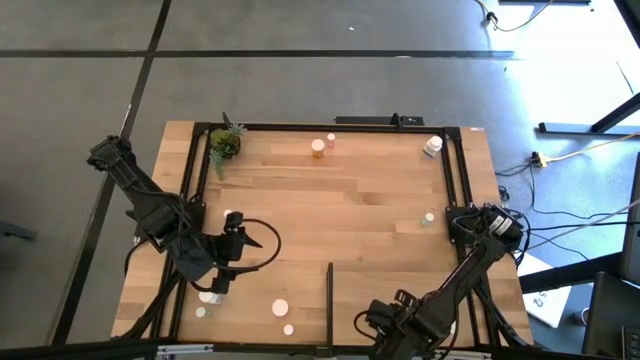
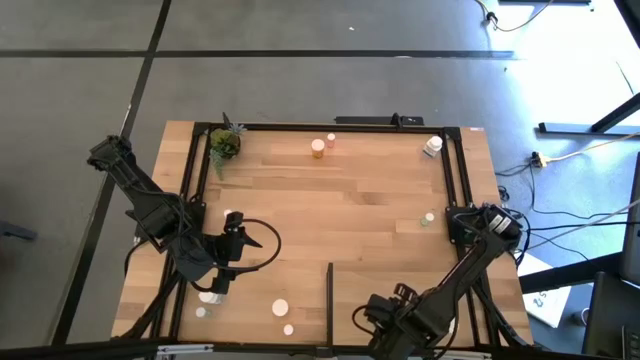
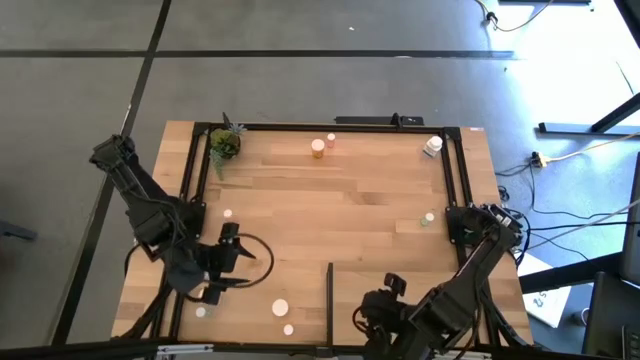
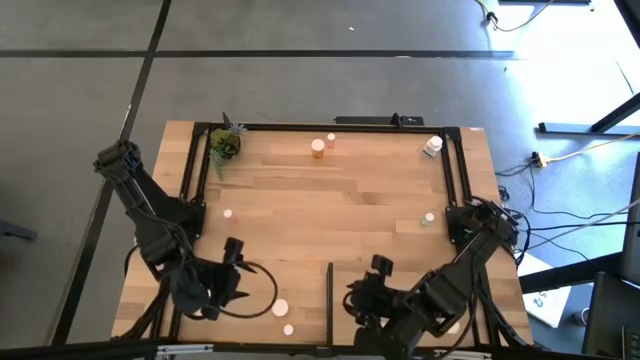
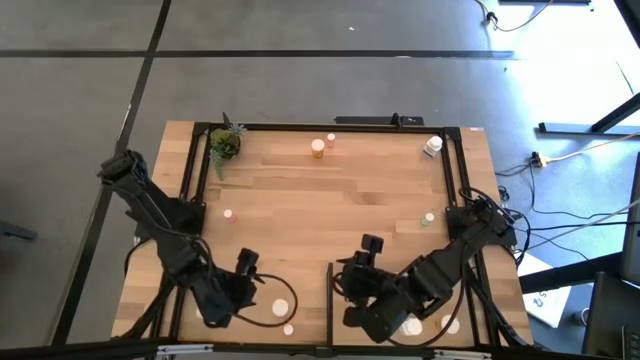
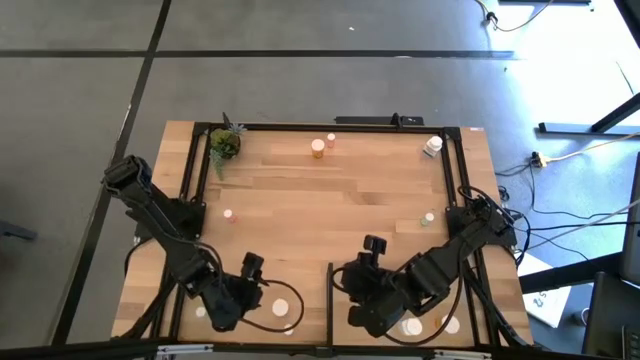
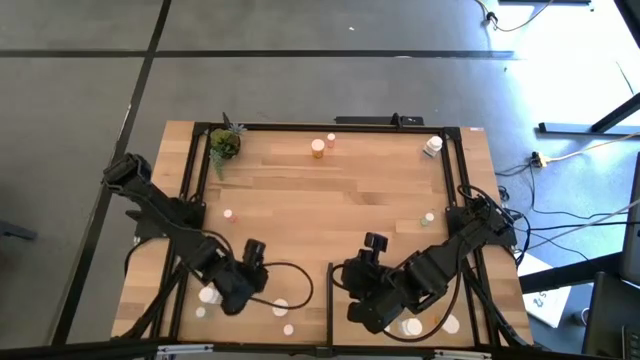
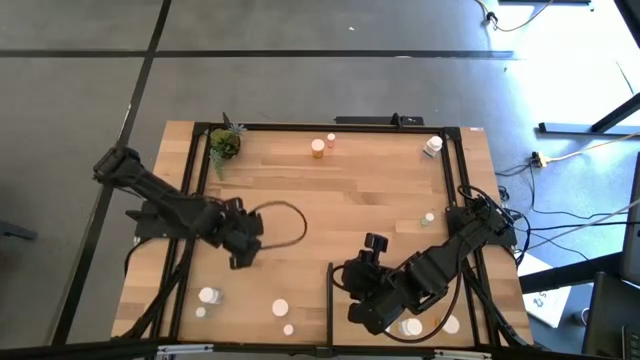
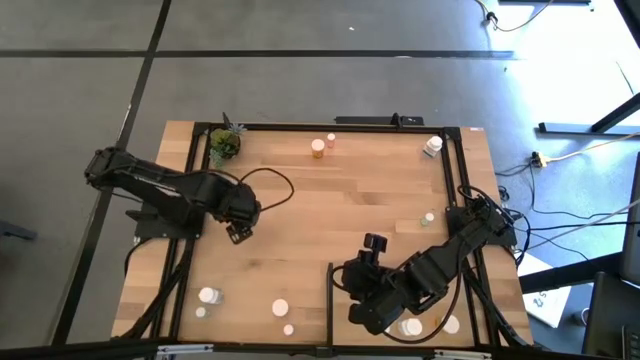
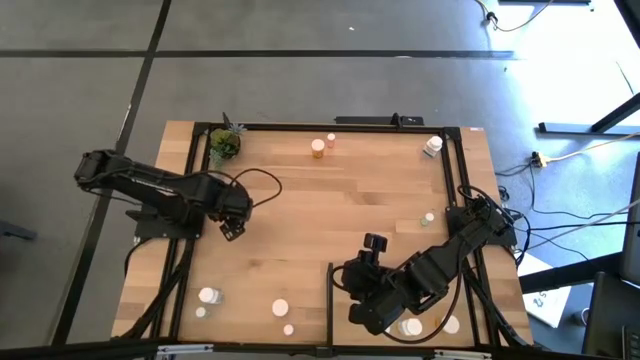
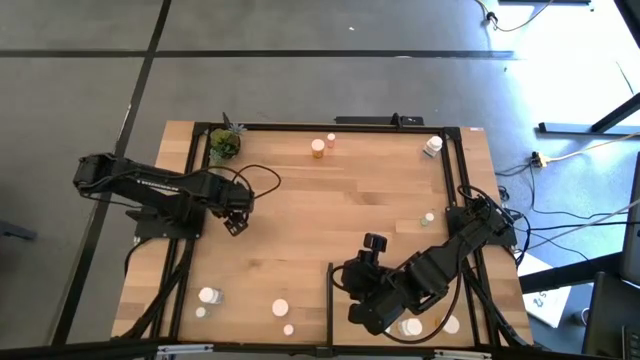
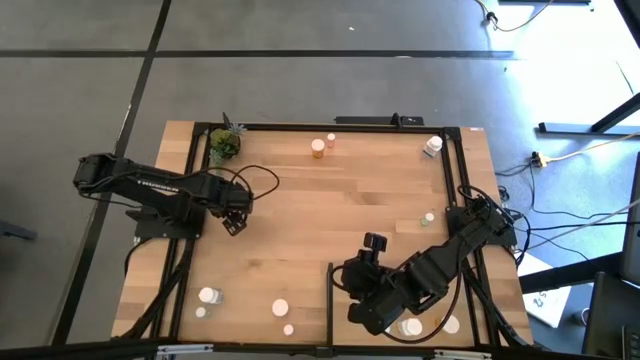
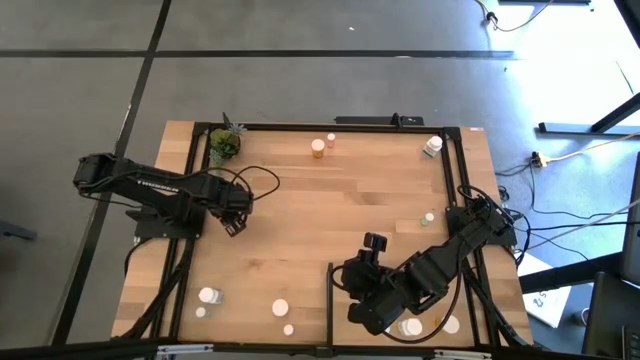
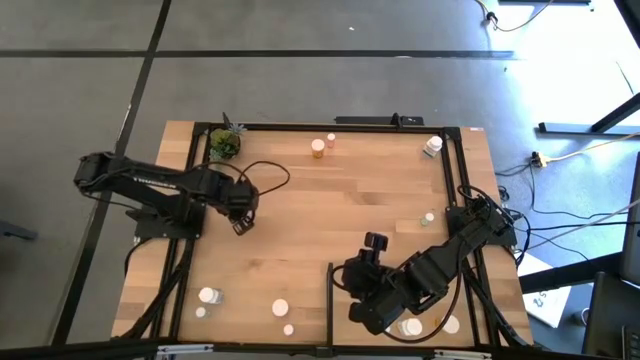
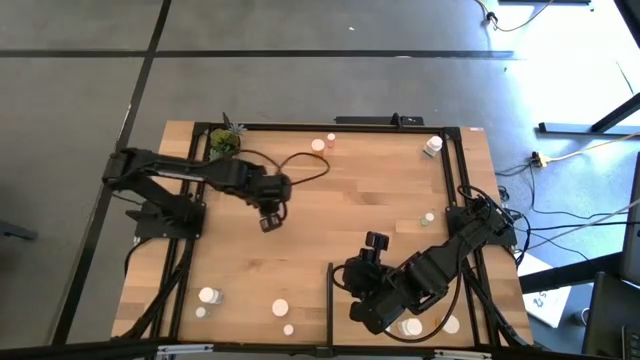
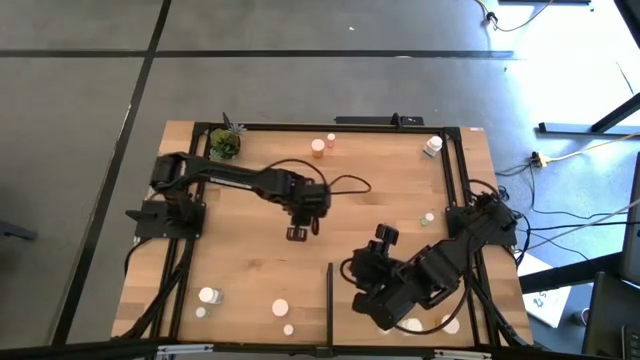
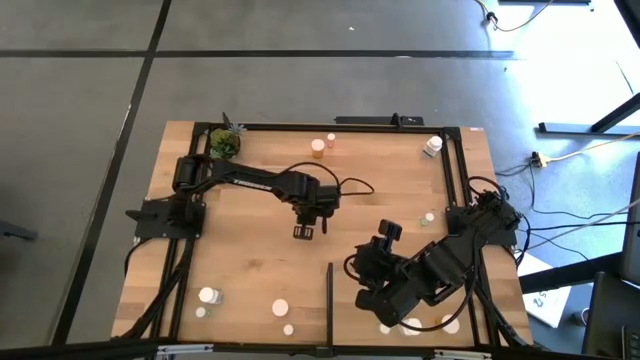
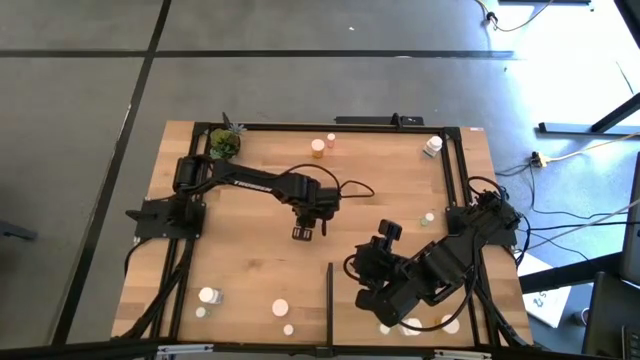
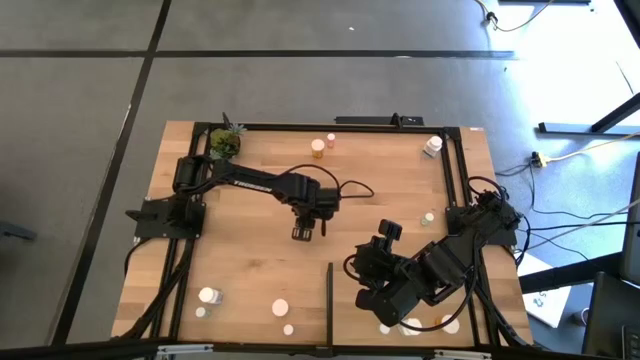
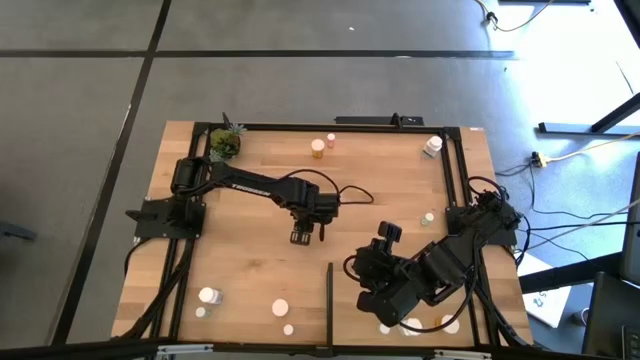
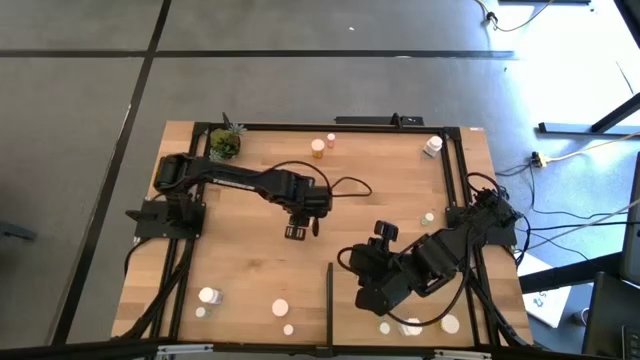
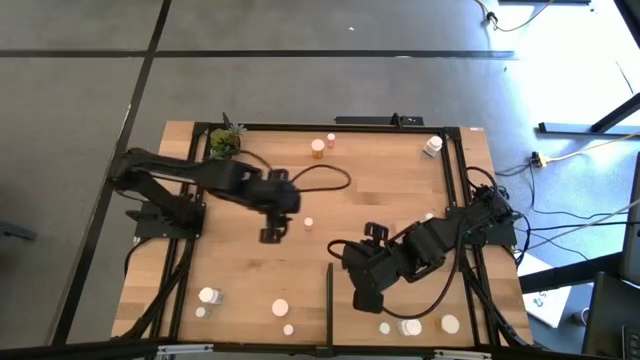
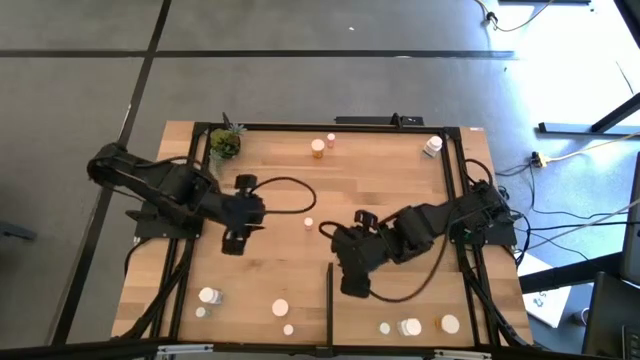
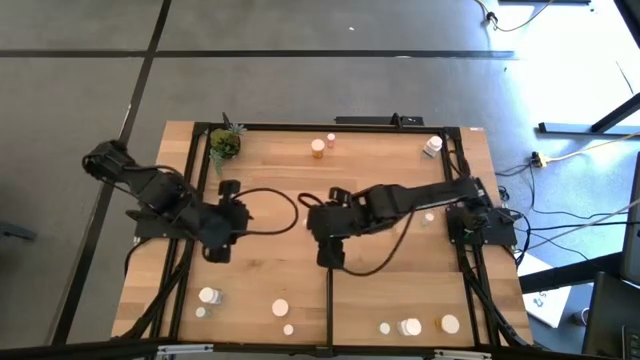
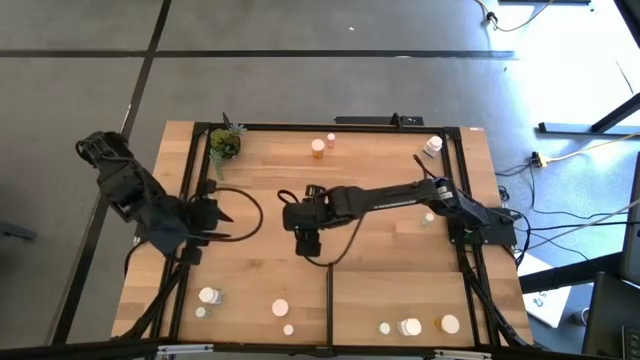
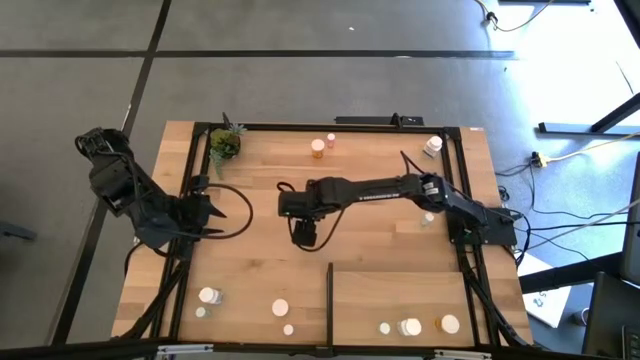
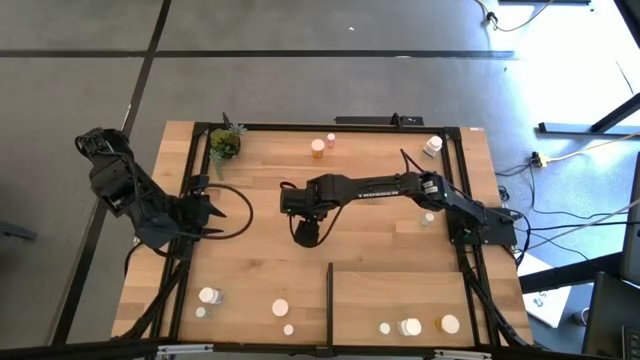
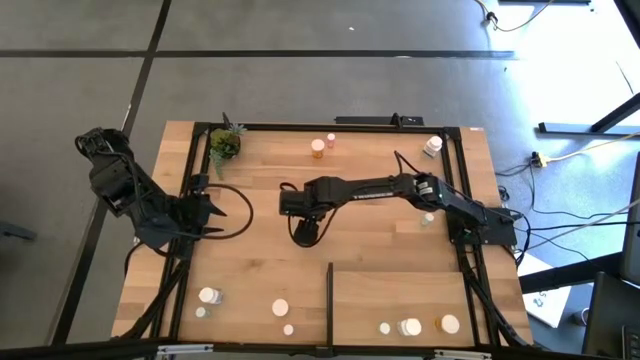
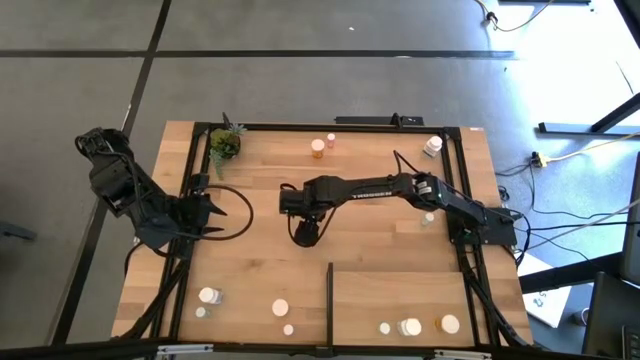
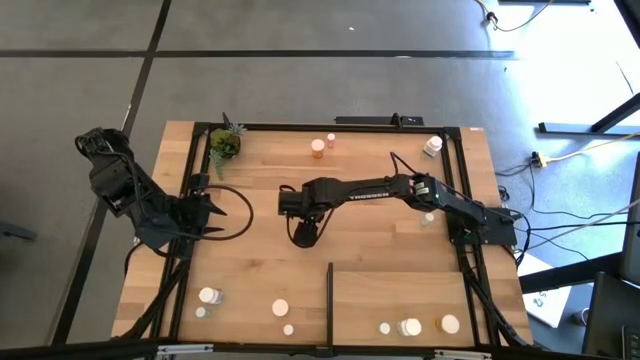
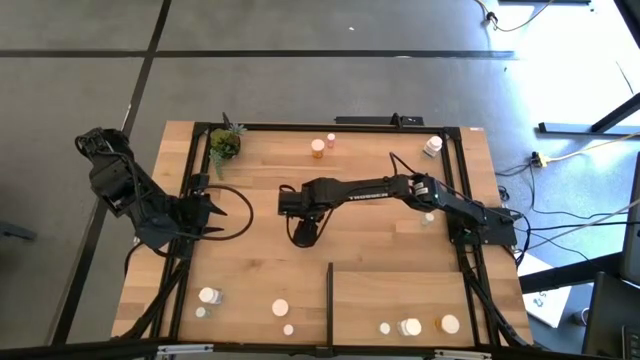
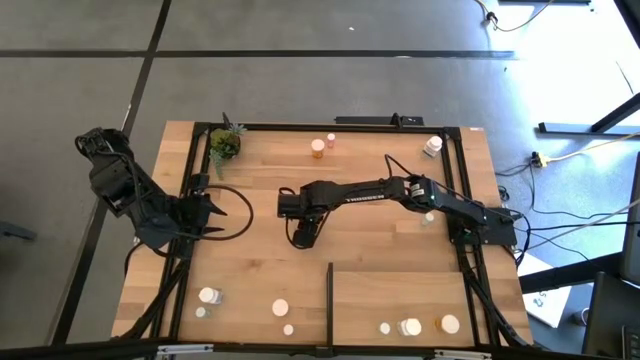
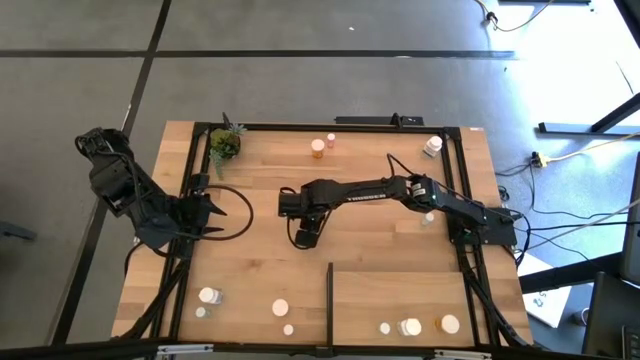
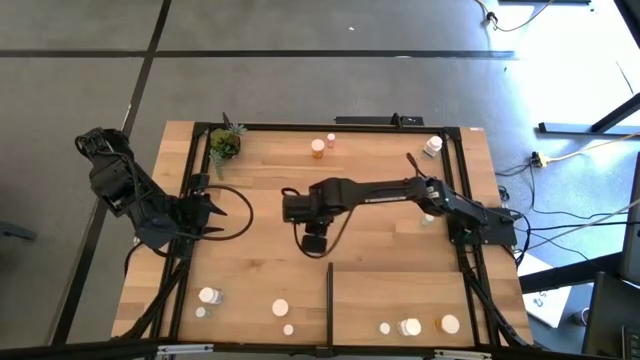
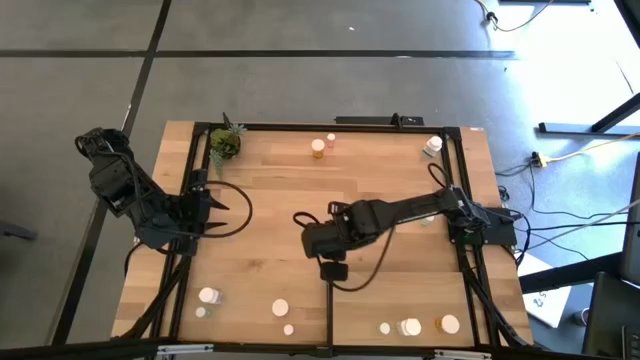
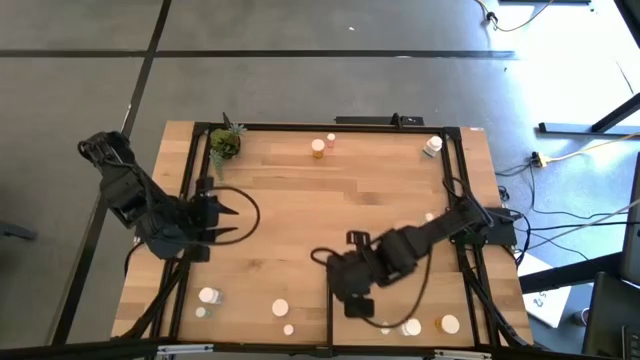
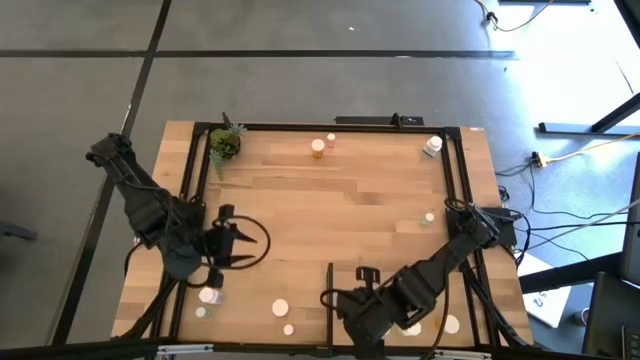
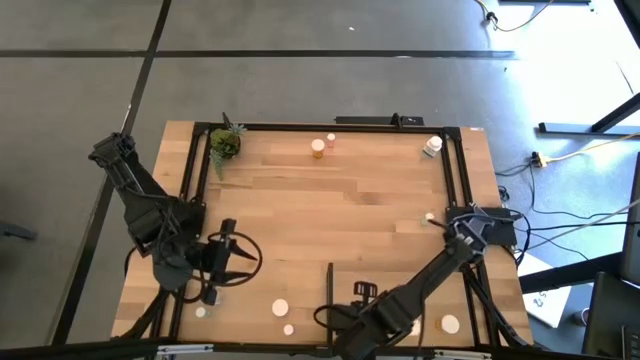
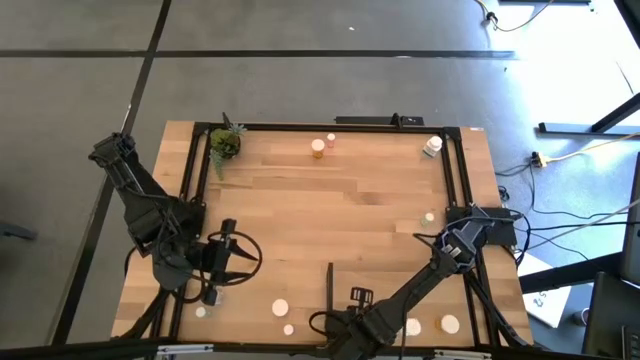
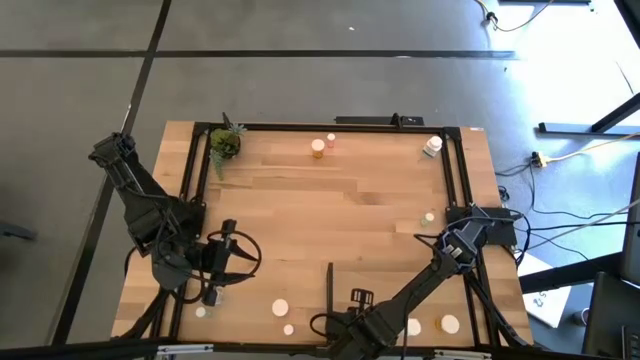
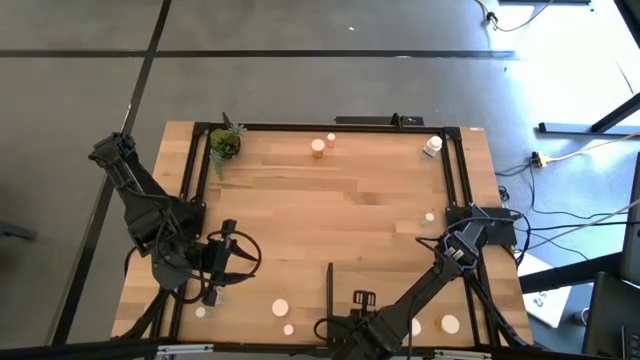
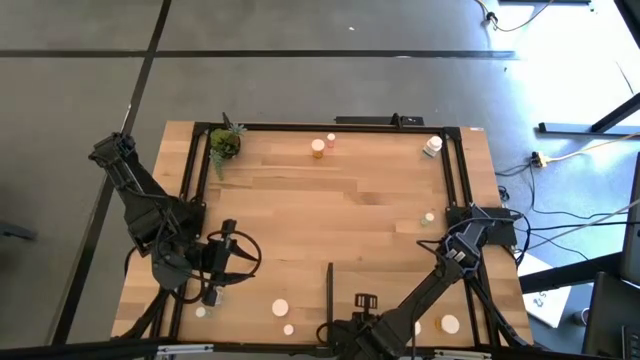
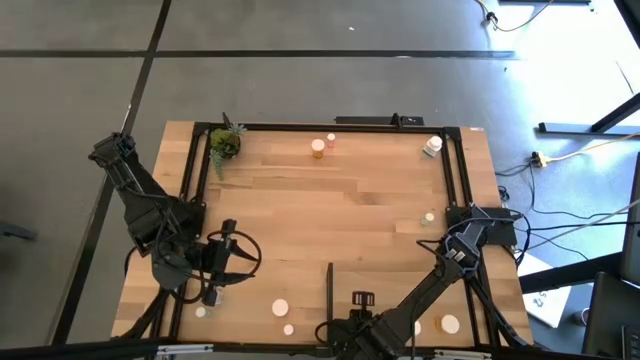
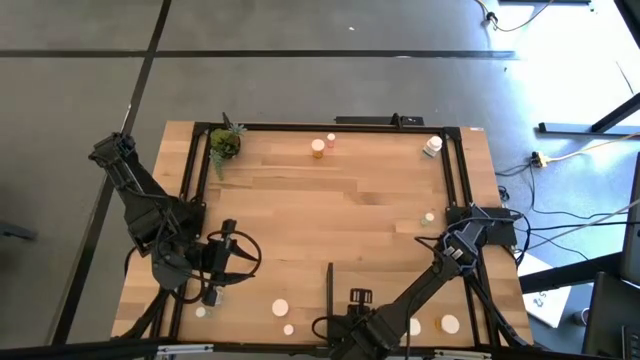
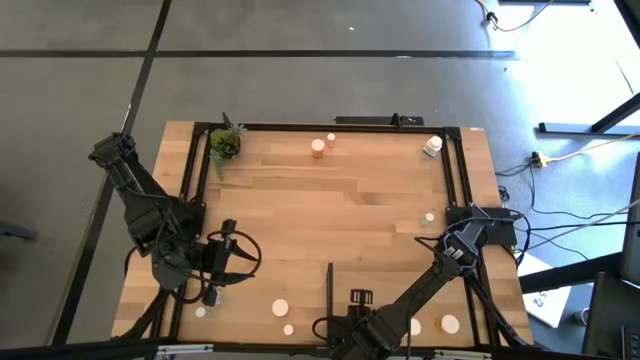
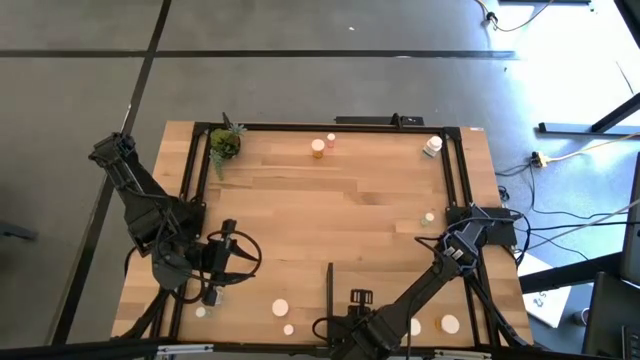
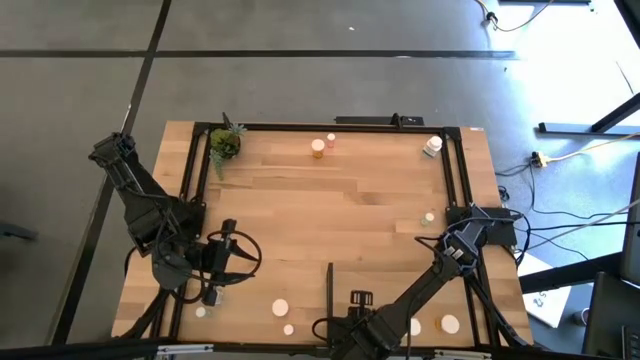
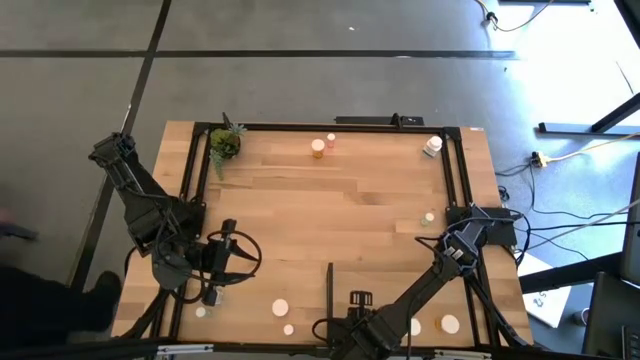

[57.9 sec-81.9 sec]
Task: Pick and place medicine bottles onto shelf by color
Put the middle pink pill bottle on the shelf
